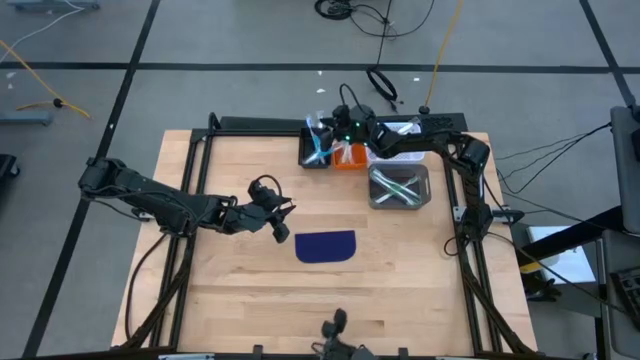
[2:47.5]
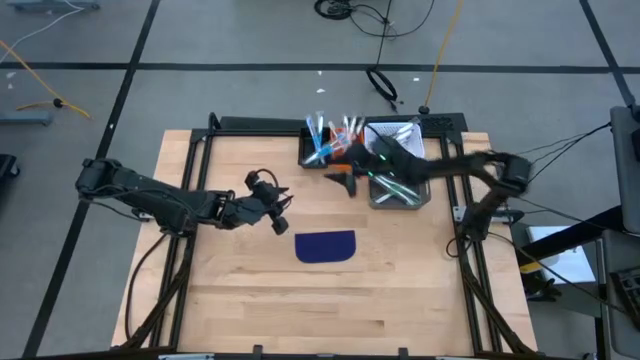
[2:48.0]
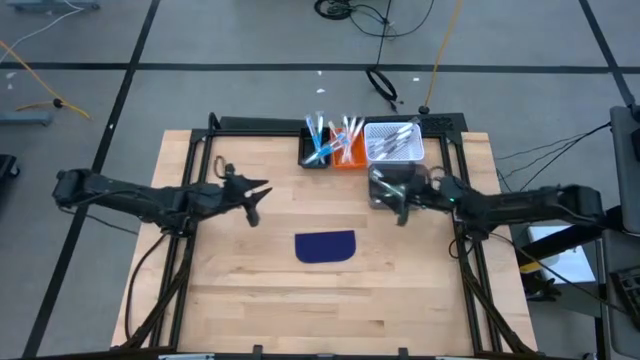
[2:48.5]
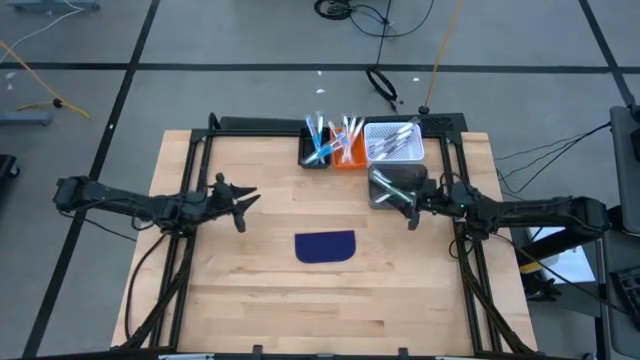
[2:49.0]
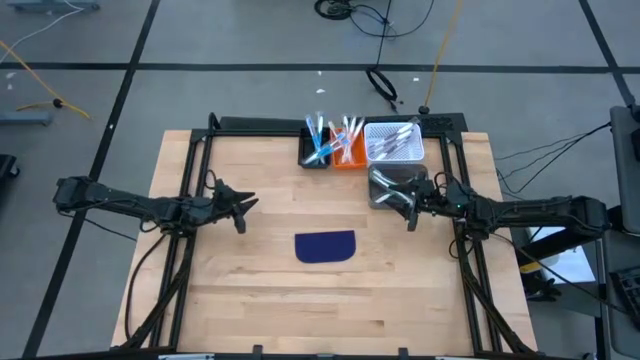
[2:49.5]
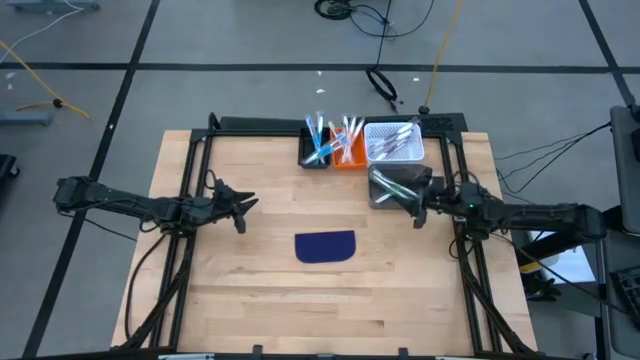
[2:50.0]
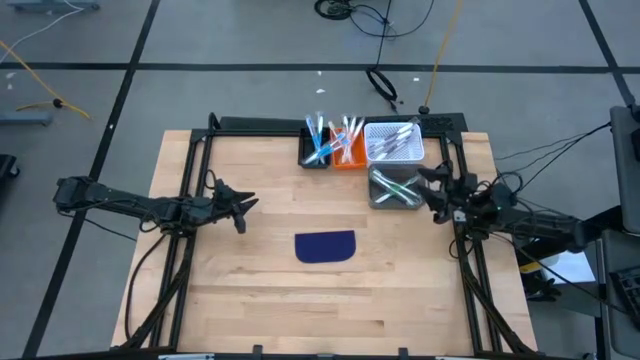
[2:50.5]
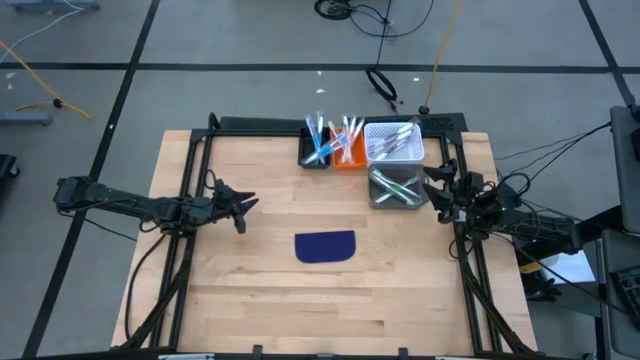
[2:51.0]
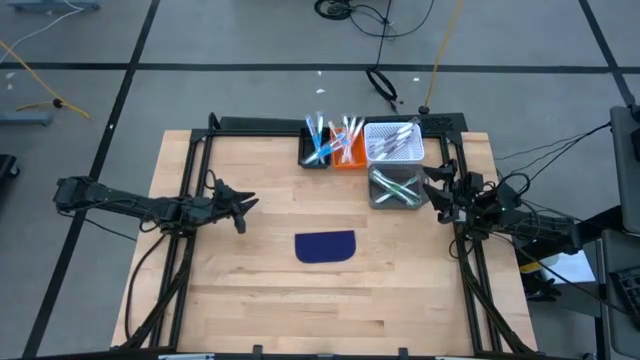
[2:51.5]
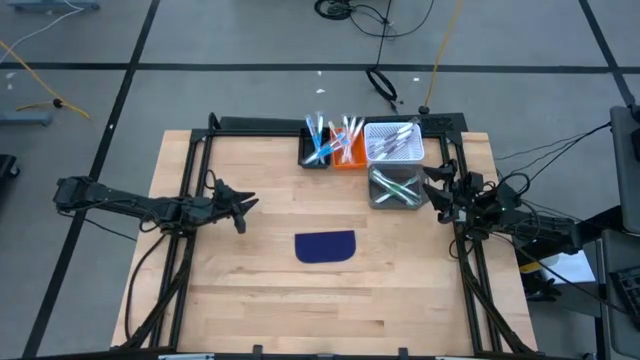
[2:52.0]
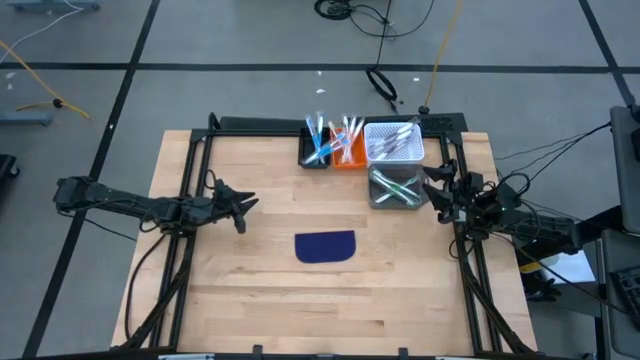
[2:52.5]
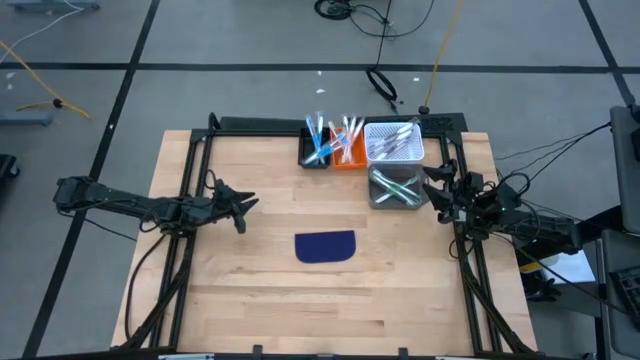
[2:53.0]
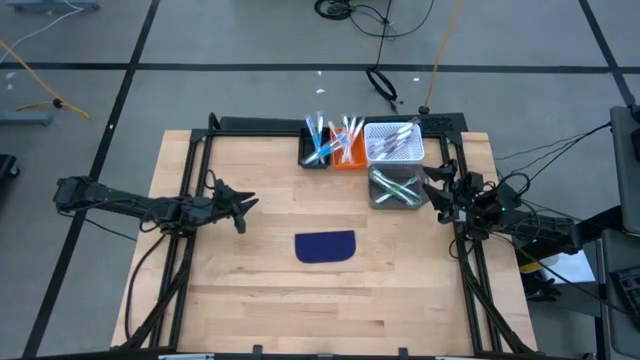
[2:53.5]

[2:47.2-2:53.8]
Task: Pick & Place Toothbrushes
Return to Home Position

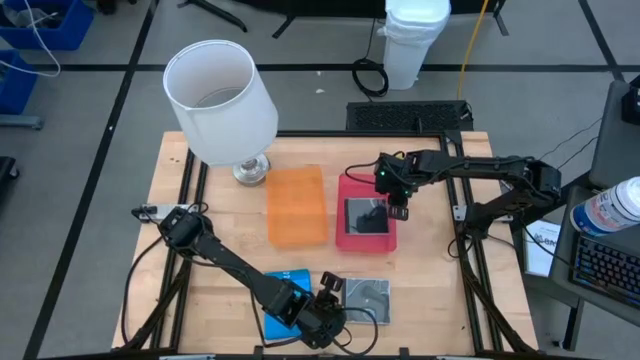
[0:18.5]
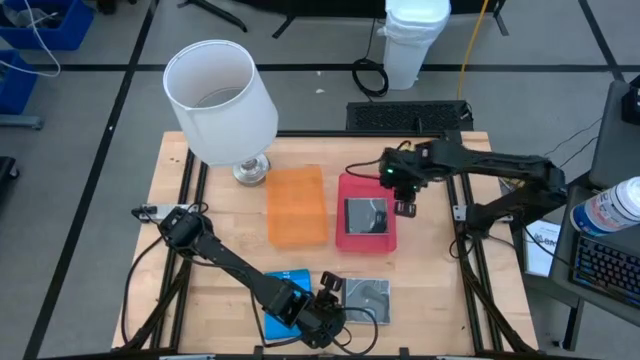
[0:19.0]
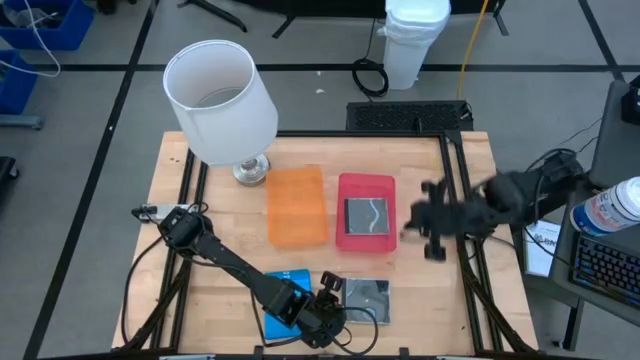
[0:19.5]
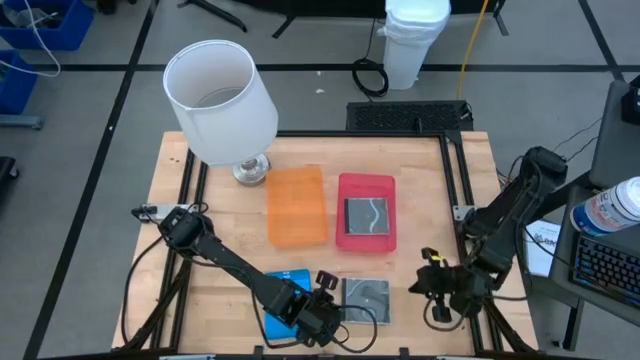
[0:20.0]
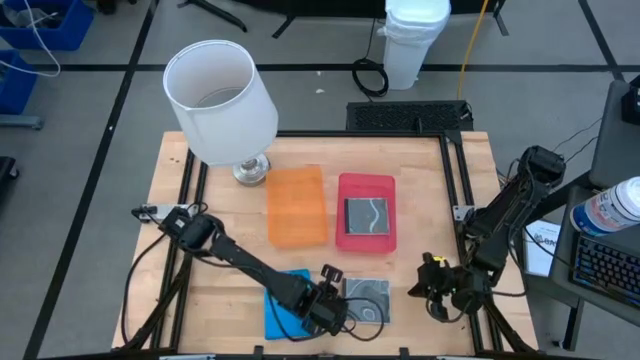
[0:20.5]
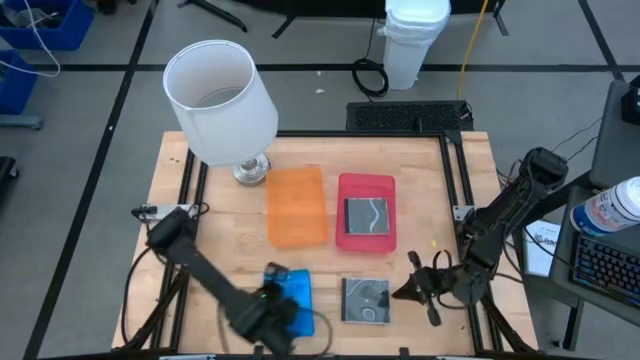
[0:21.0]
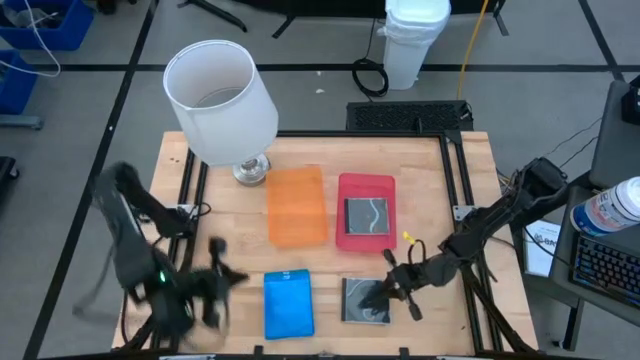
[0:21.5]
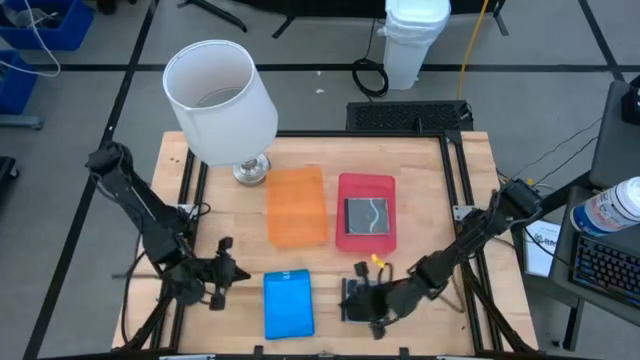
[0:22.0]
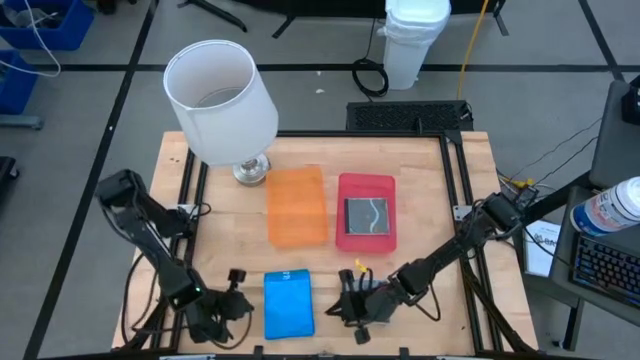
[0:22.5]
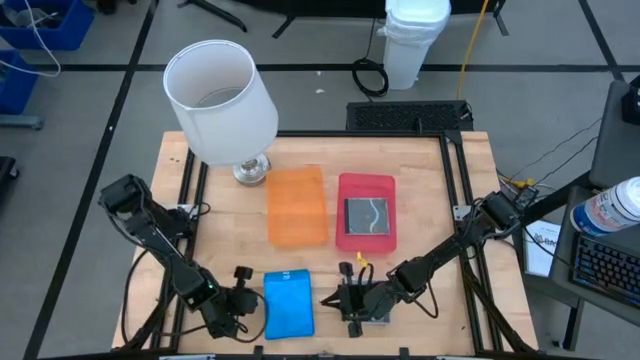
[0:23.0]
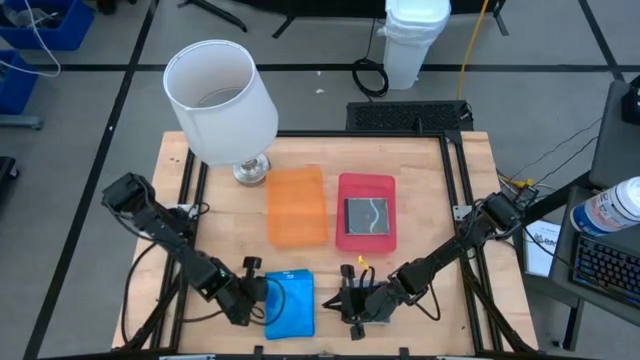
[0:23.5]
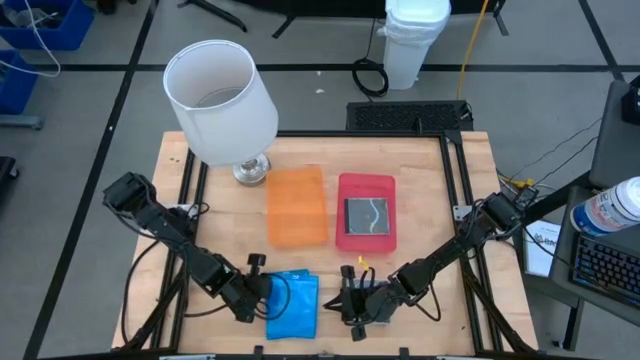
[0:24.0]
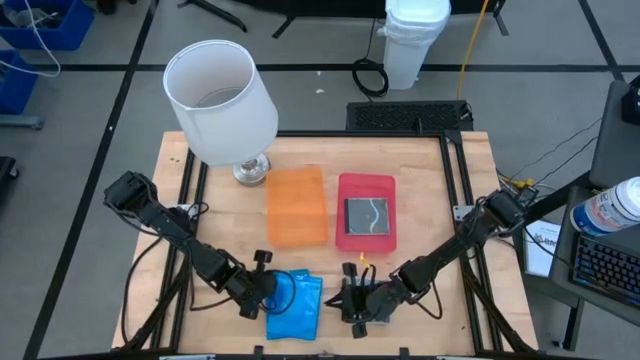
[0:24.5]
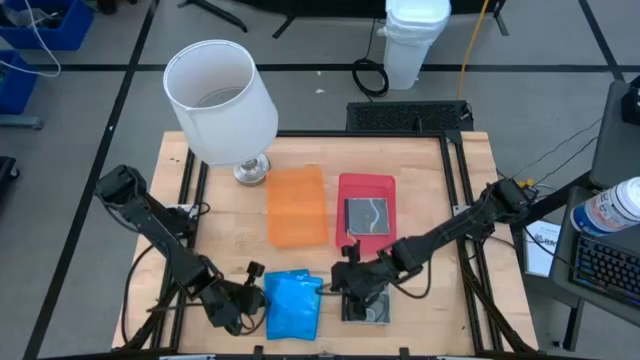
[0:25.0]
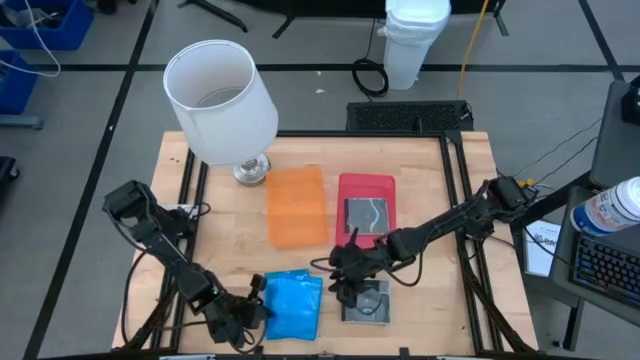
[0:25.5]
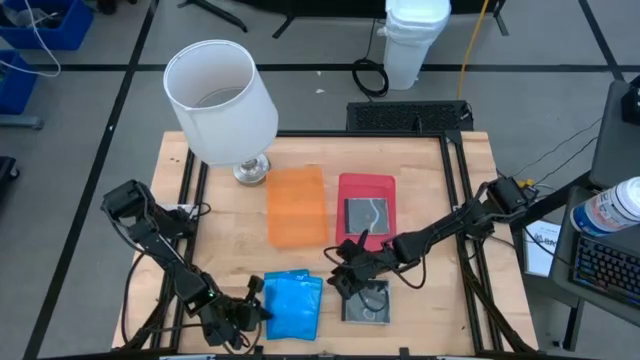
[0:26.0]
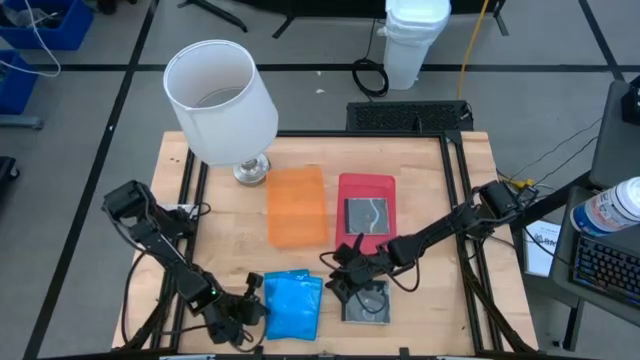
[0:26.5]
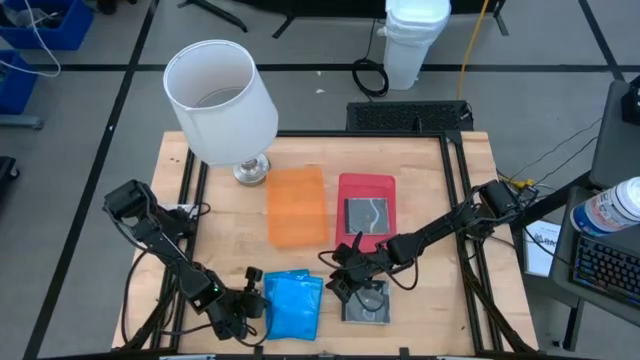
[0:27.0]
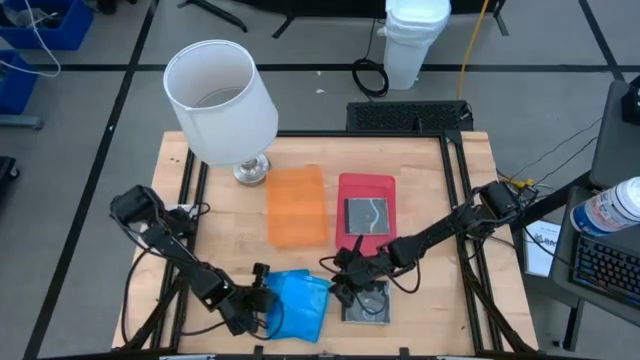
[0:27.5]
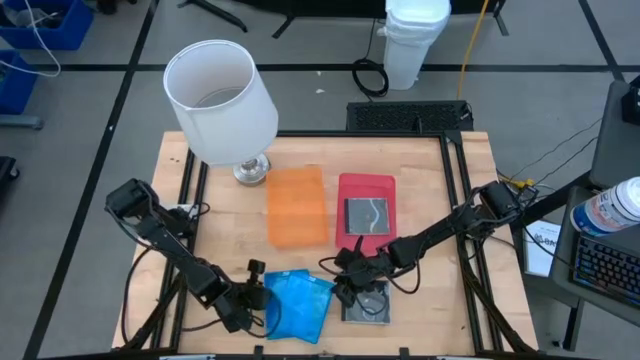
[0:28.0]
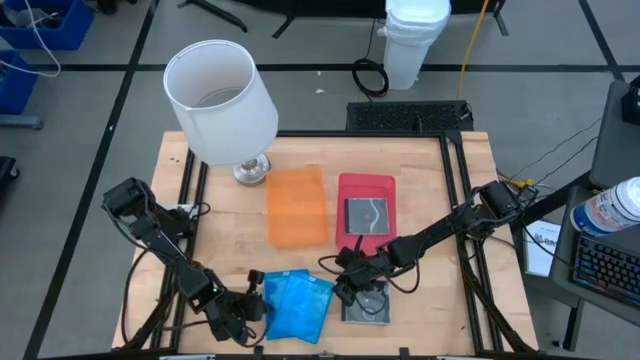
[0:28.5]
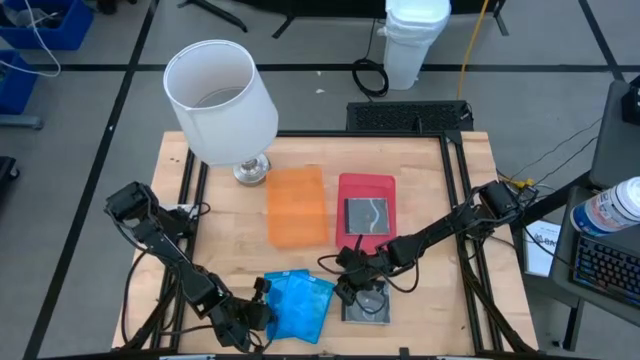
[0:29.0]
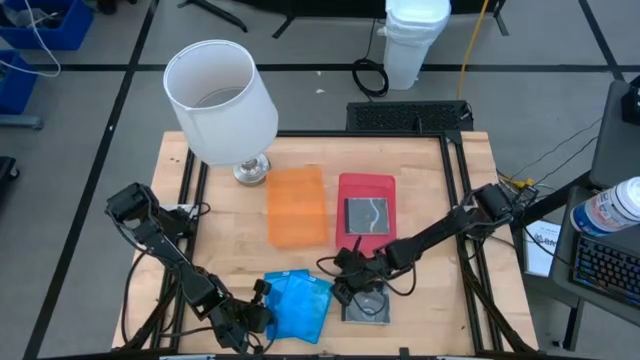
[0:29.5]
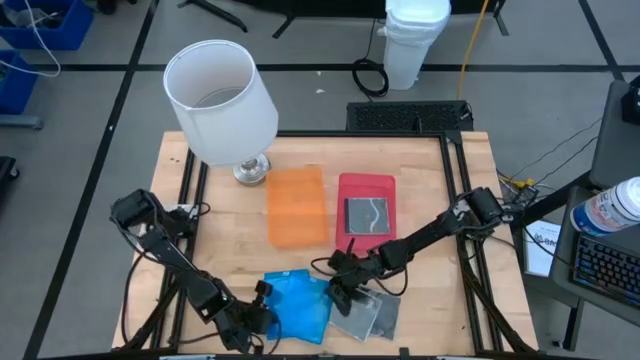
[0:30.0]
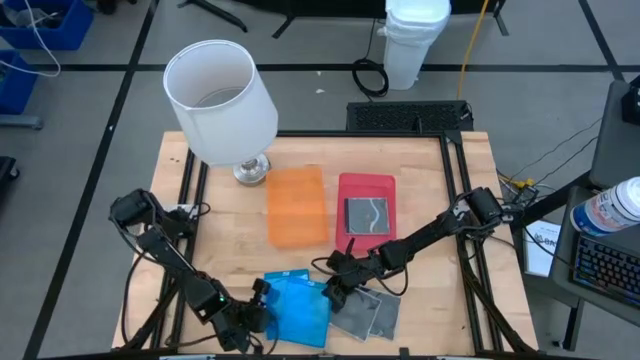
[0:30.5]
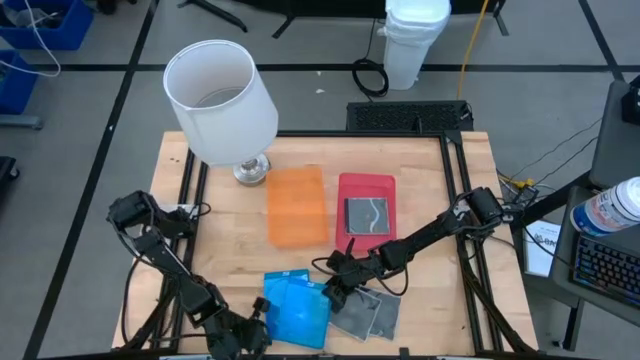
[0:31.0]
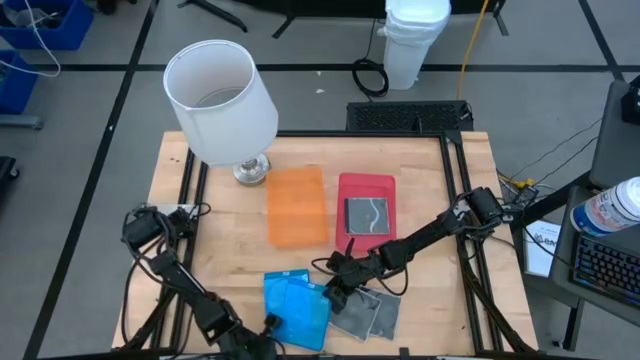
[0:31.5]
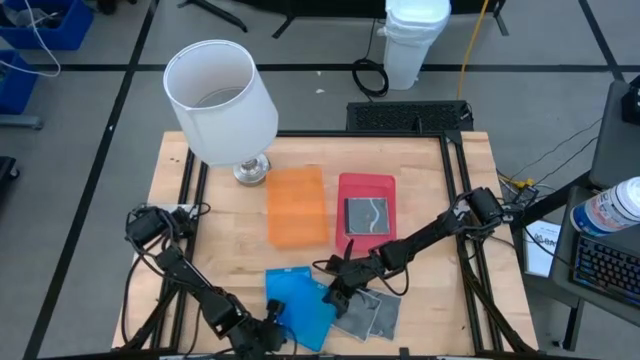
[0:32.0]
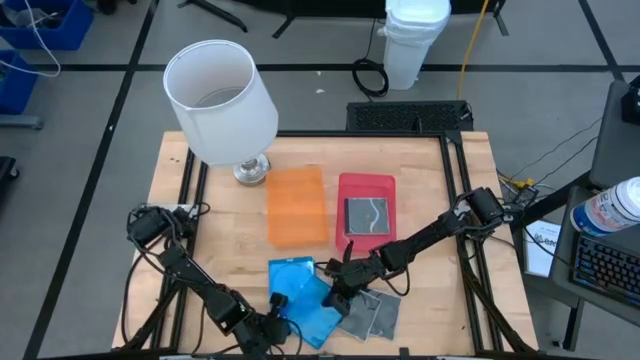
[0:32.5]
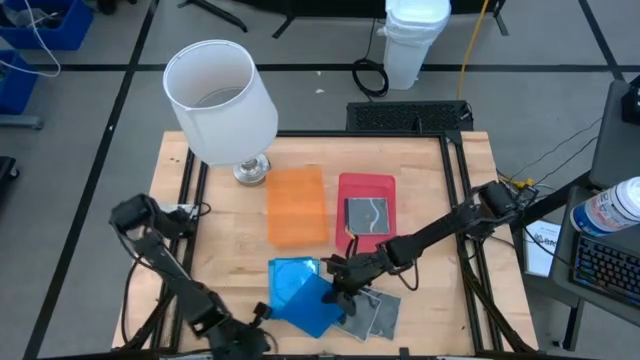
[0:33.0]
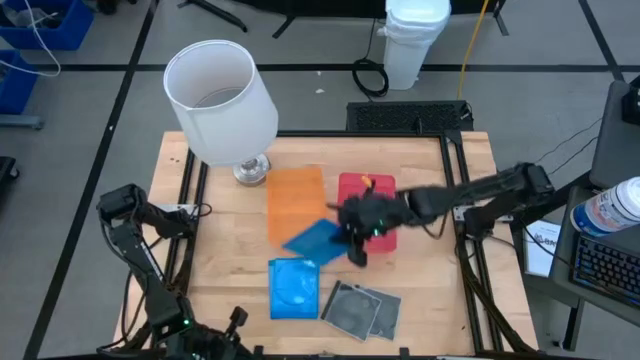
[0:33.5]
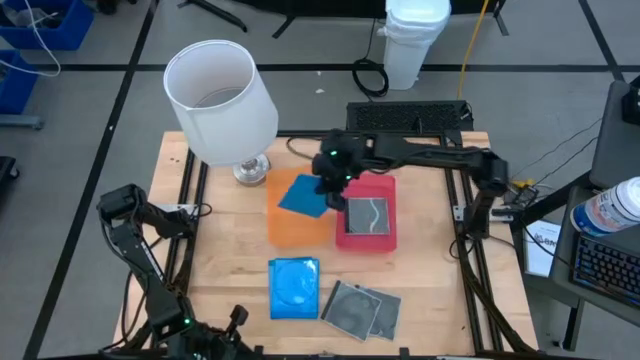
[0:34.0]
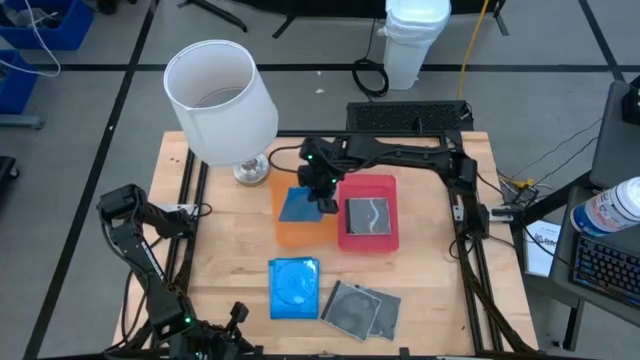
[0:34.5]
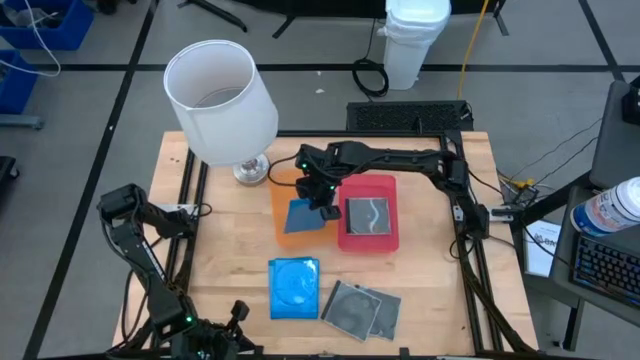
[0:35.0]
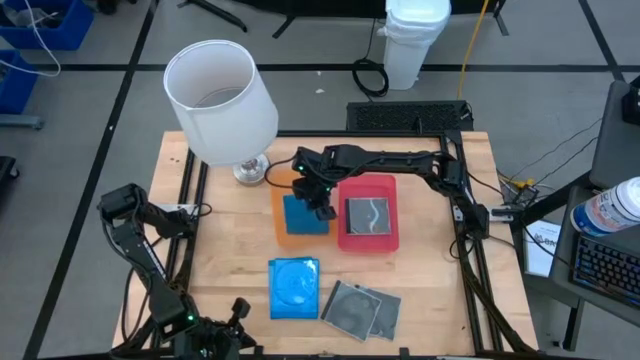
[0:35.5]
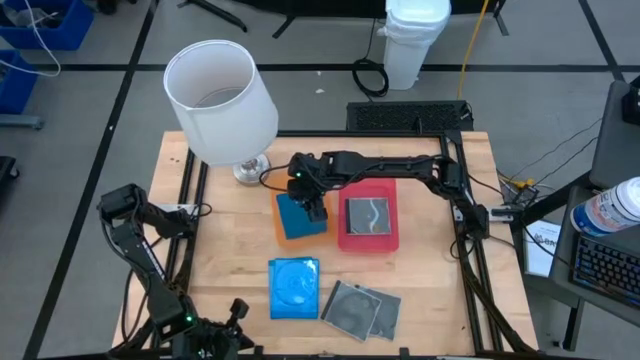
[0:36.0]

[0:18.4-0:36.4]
Task: Pick & place jewel cases by type
Put the blue CD case into the orange bin
